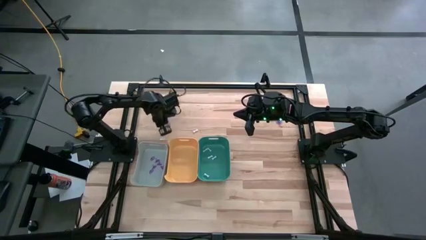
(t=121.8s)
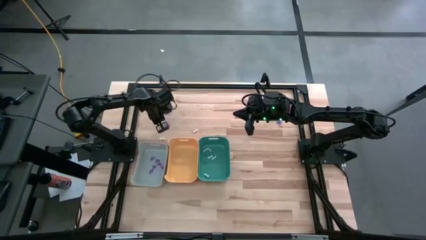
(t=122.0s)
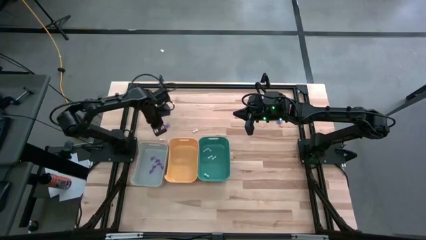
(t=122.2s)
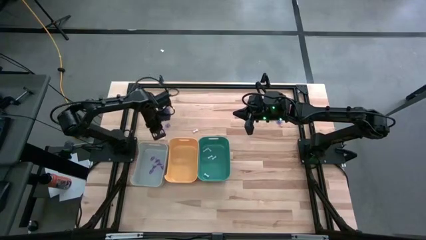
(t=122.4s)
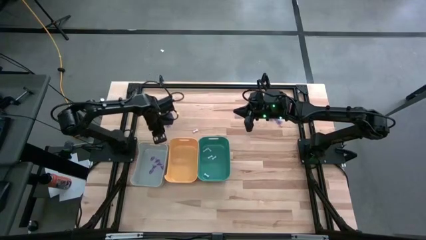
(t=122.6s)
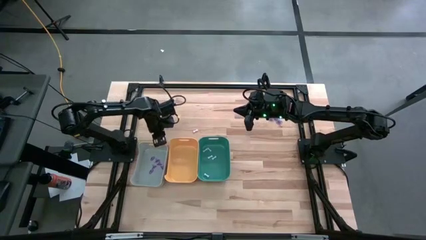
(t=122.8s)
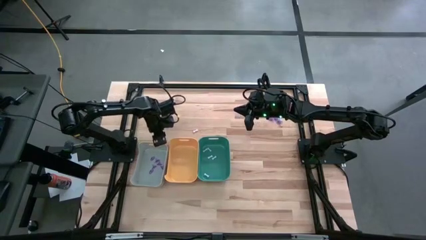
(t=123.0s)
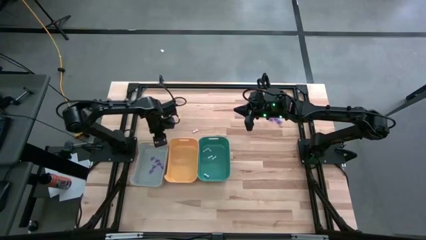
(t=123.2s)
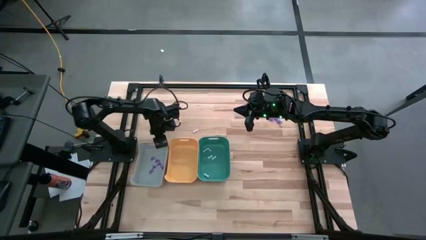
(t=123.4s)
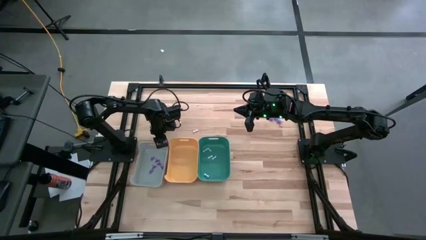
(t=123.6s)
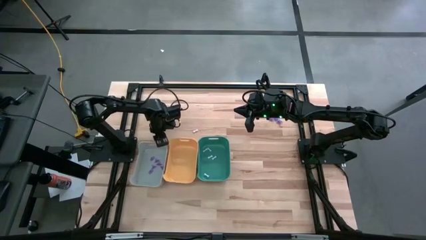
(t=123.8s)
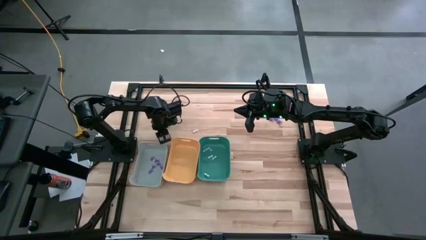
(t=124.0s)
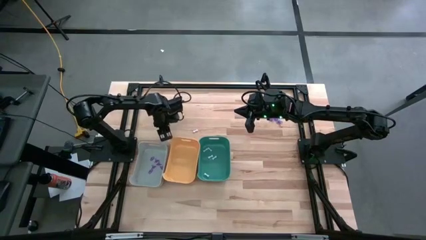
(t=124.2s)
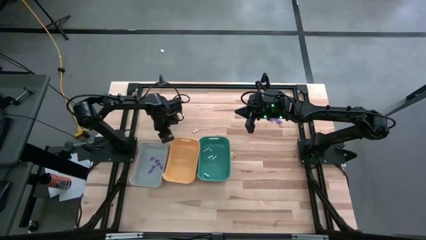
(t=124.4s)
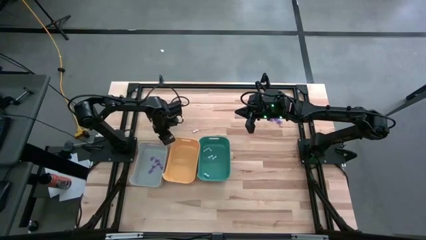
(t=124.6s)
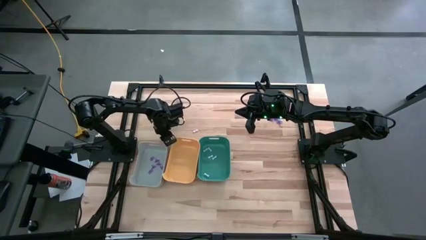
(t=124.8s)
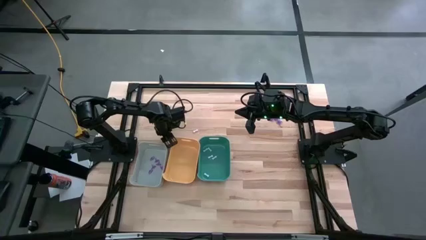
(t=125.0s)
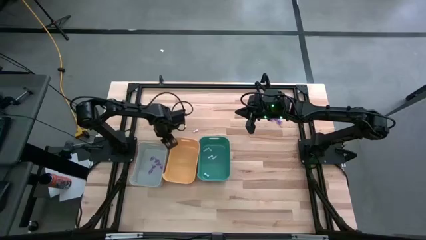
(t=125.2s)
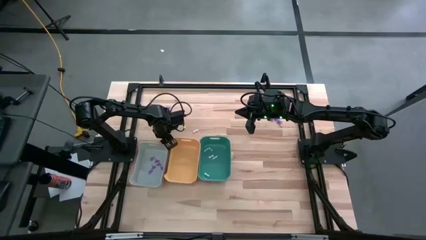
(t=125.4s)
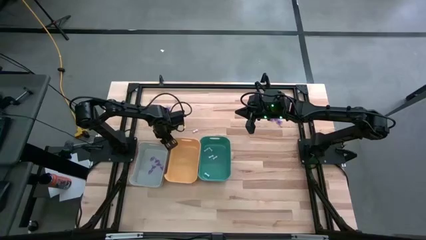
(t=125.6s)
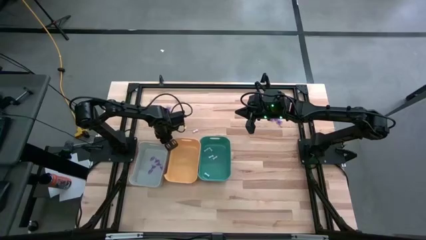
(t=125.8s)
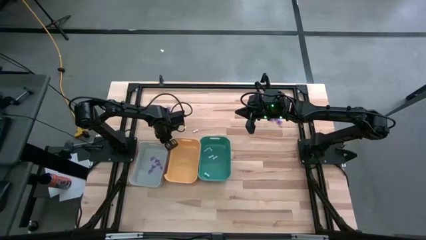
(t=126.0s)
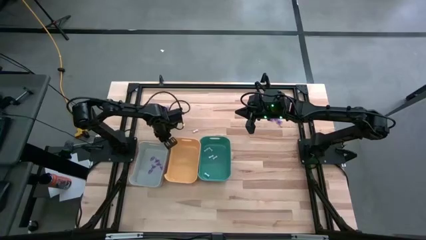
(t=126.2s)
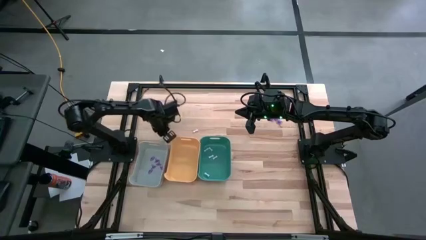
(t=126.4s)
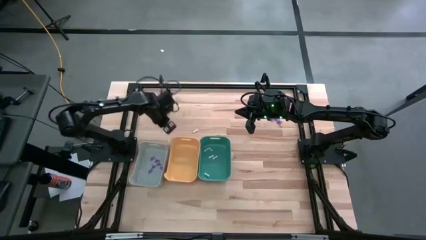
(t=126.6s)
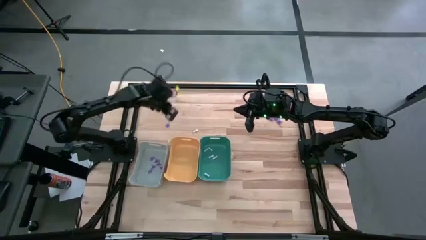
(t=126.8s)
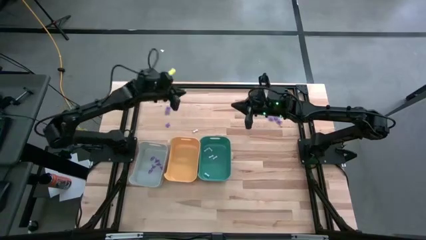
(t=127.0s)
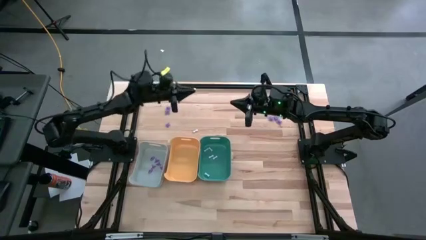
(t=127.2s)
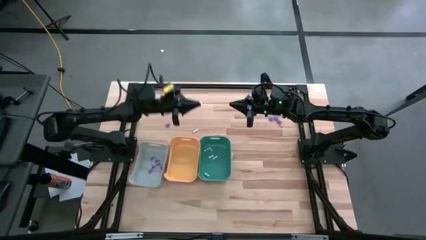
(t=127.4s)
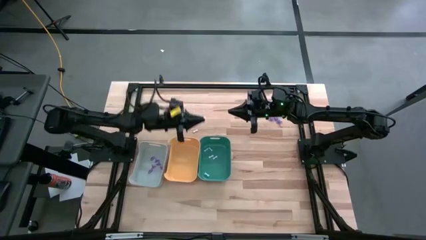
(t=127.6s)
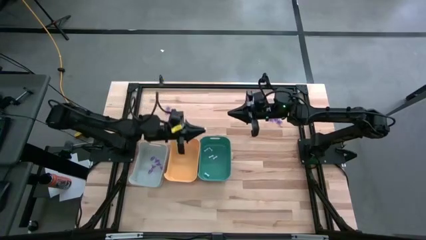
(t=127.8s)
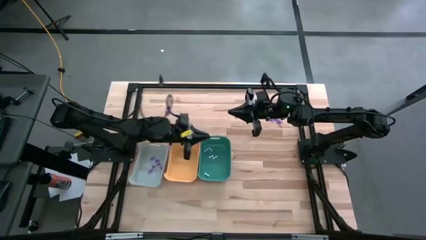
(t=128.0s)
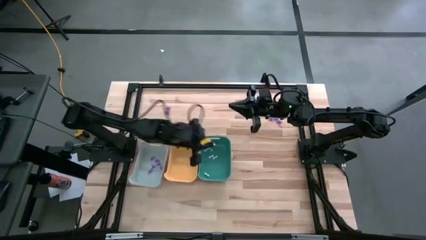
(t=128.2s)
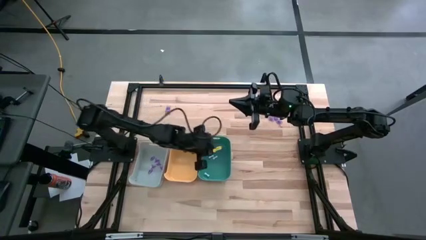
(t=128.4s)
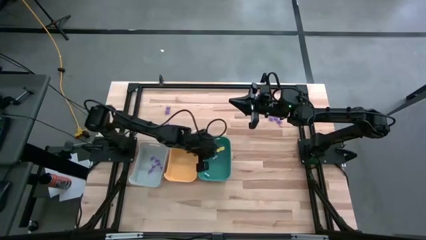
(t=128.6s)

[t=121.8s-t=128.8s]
Task: Sort Halloween decoration
Put the white bone toy into the green bin

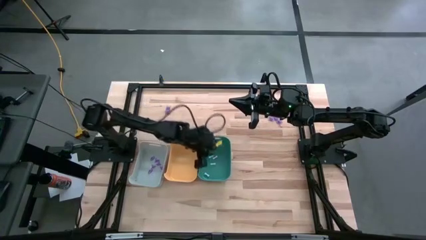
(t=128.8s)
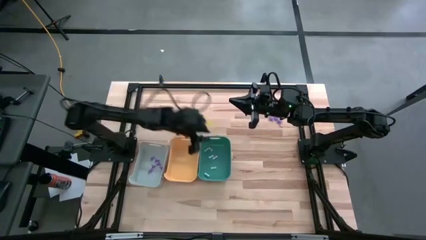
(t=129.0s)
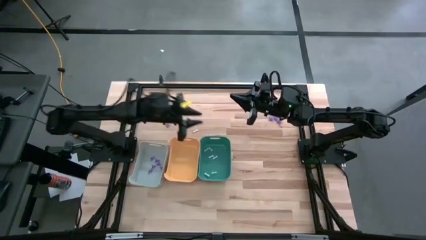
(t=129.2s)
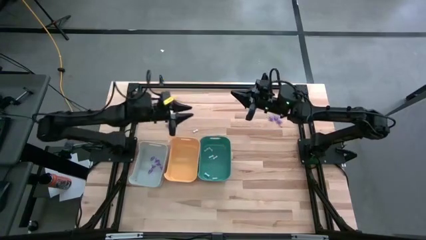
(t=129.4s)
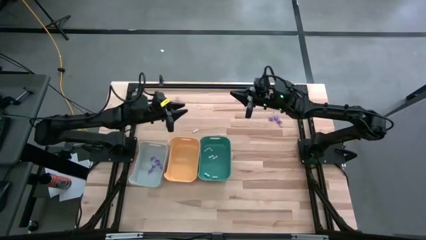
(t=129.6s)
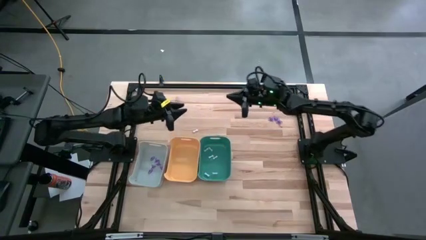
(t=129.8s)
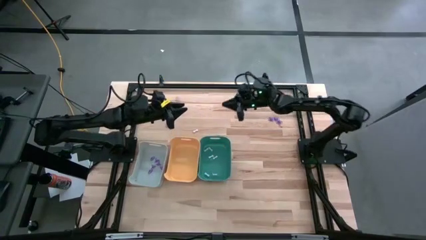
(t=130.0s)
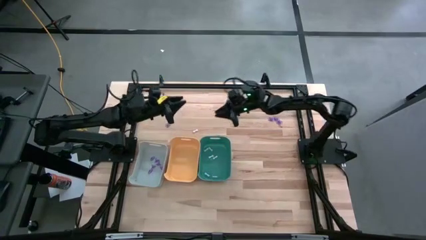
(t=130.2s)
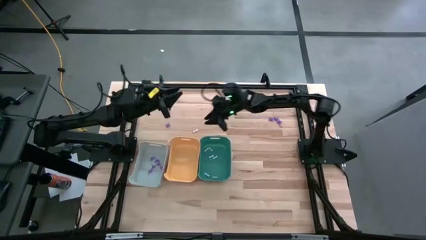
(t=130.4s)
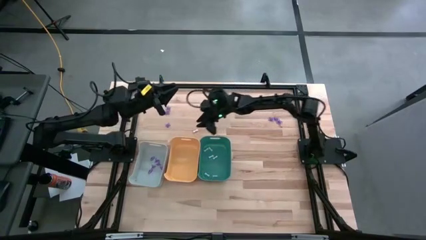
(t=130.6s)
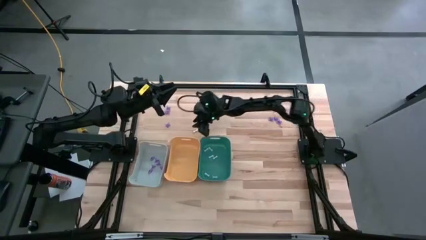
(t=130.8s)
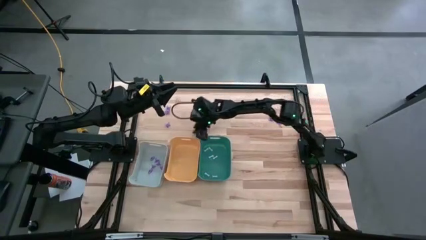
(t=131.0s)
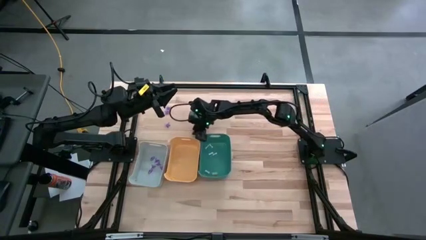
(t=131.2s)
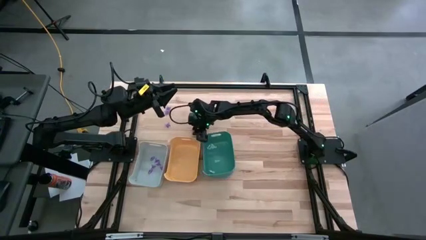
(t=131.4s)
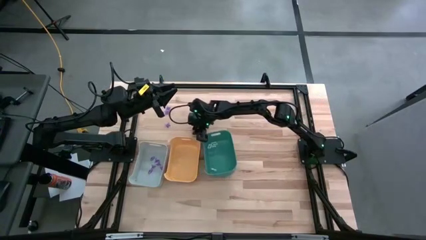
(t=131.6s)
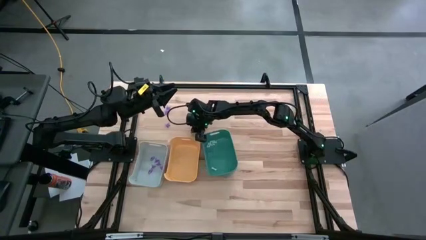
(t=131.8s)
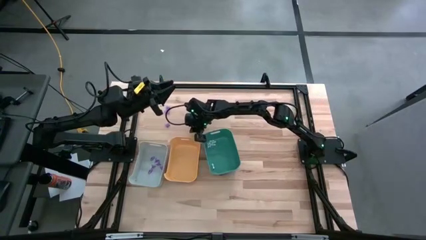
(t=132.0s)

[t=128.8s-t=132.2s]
Put the white bone toy into the green bin

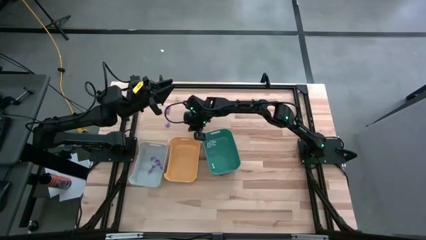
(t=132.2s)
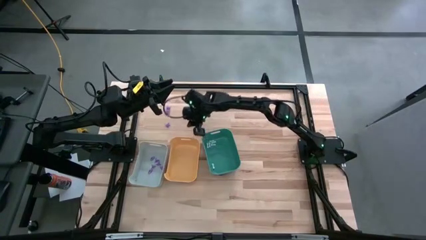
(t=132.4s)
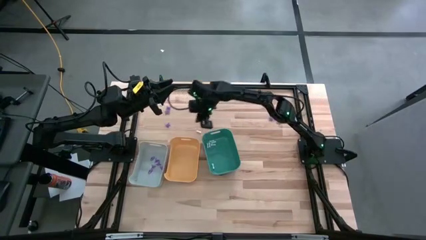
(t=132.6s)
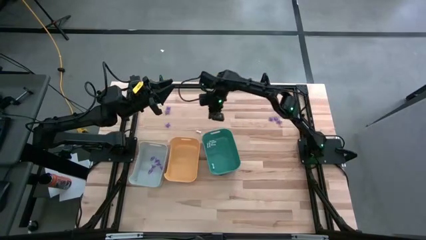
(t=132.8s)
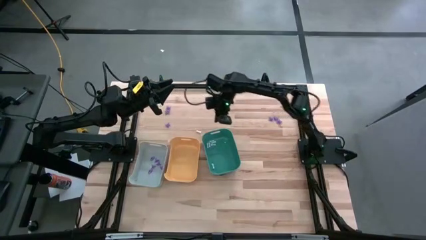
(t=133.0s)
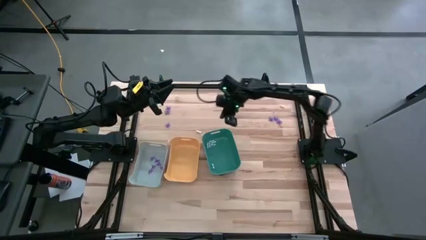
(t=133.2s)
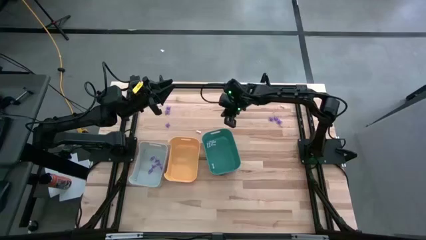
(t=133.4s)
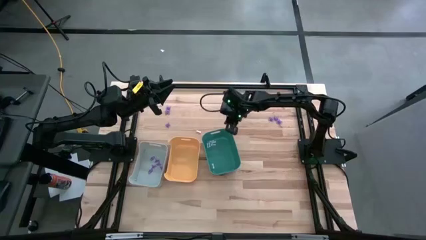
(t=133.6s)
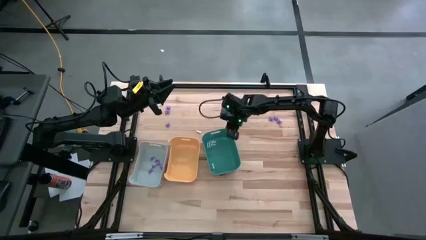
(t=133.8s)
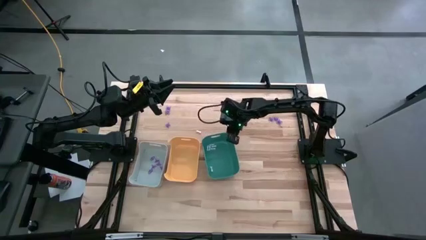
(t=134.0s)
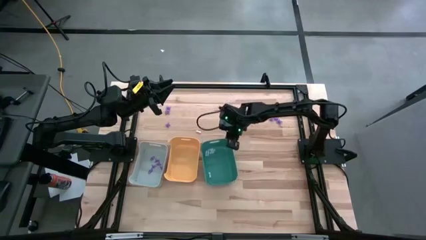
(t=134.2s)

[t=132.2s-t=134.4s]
Adjust the green bin

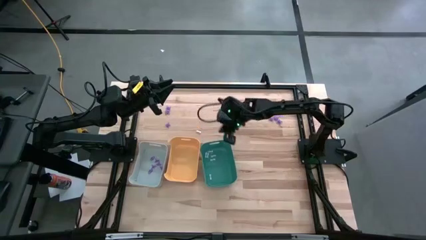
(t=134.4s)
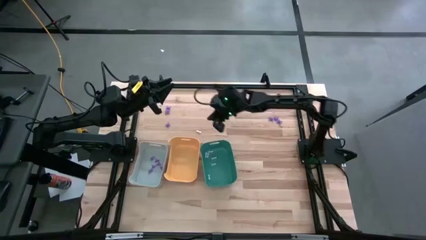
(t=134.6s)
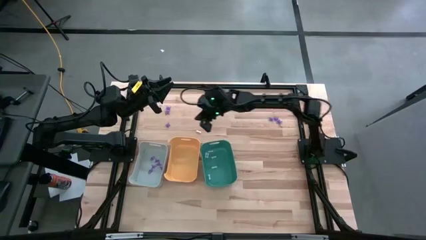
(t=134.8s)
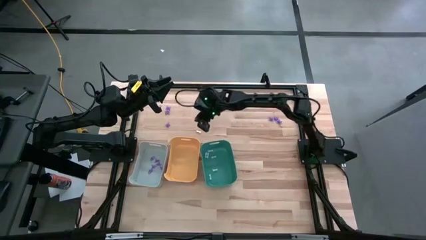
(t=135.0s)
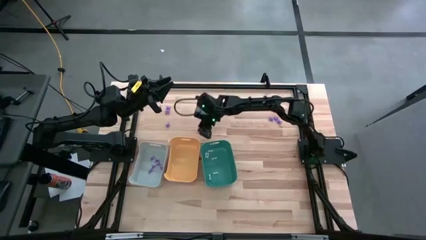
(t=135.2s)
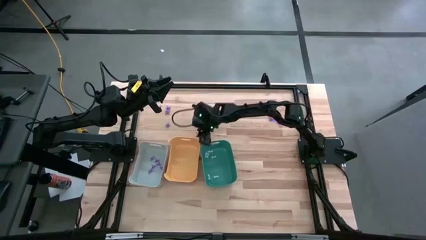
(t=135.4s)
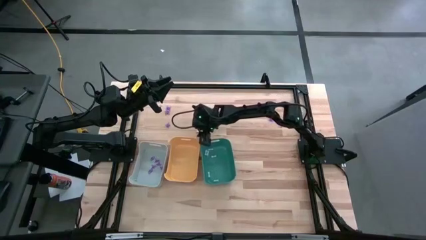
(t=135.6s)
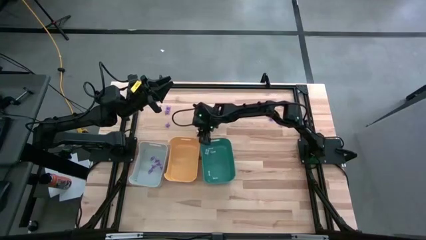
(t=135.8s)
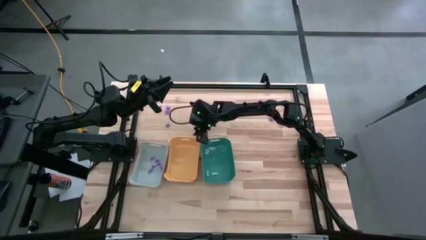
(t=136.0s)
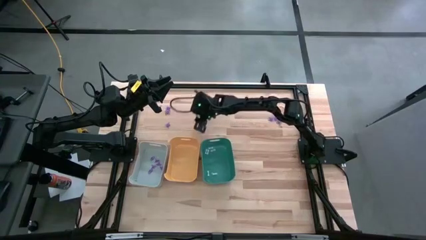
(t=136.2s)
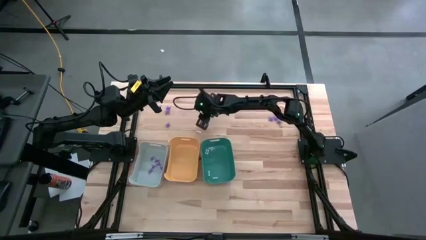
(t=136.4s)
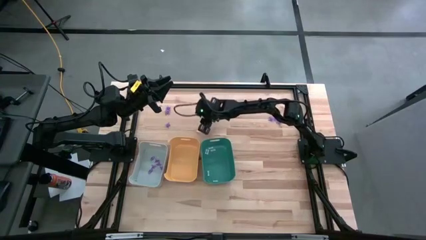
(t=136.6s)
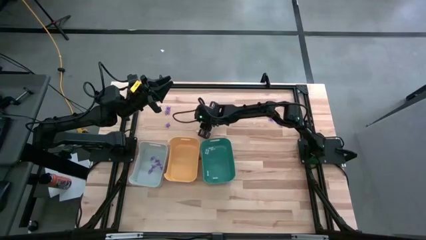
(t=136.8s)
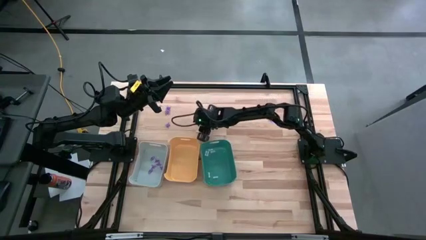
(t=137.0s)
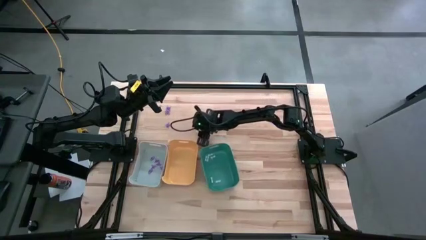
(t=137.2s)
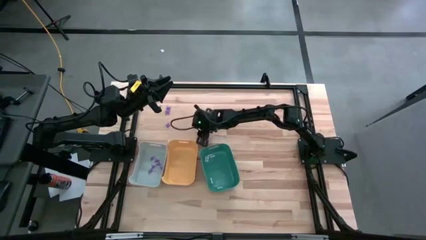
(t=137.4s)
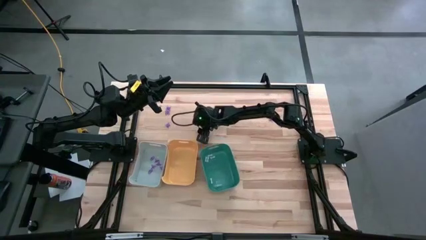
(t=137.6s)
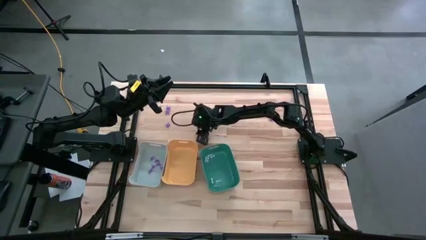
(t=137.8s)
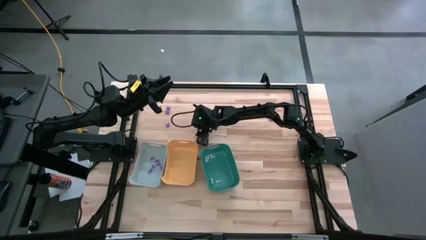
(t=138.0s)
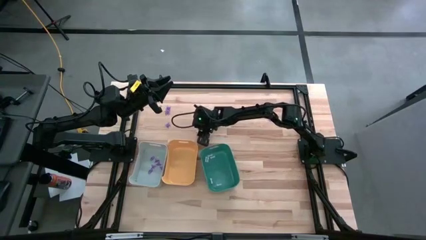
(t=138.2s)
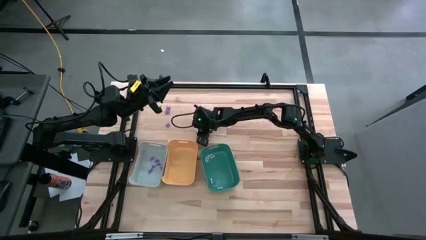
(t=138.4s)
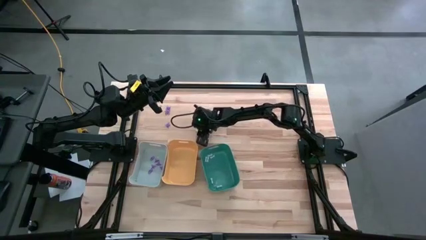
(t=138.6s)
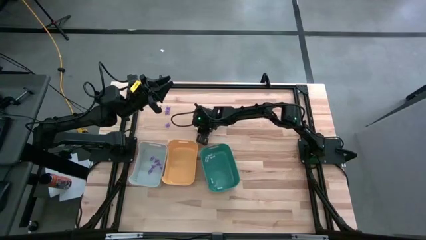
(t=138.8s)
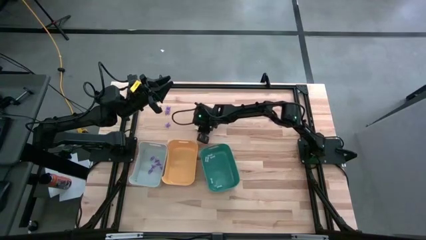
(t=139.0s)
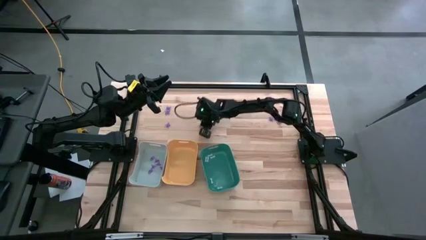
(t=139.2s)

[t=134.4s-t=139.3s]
Put the white bone toy into the green bin
